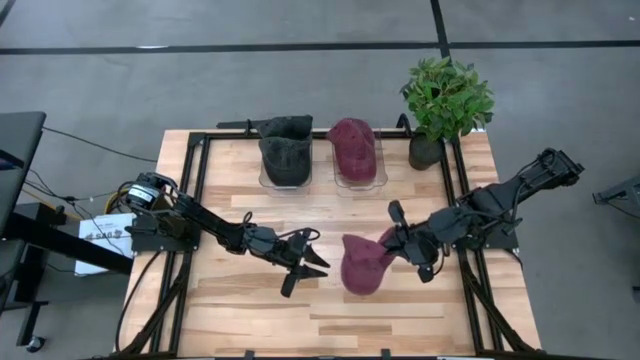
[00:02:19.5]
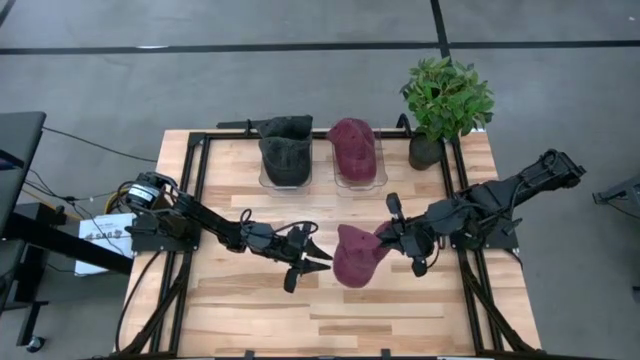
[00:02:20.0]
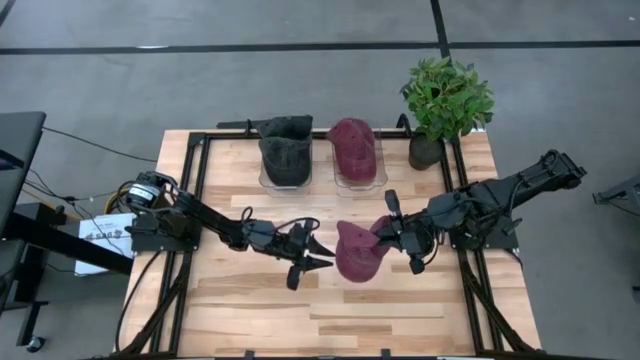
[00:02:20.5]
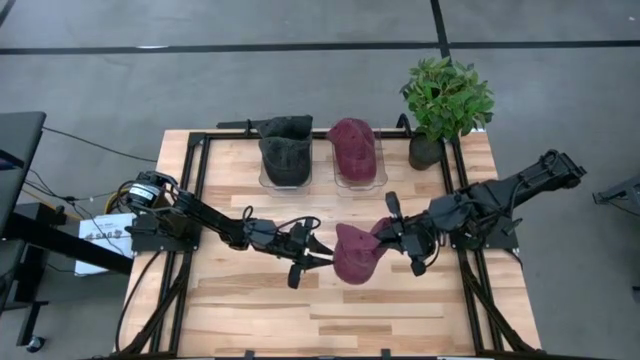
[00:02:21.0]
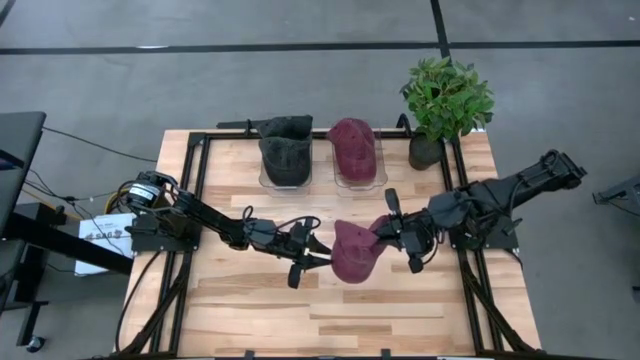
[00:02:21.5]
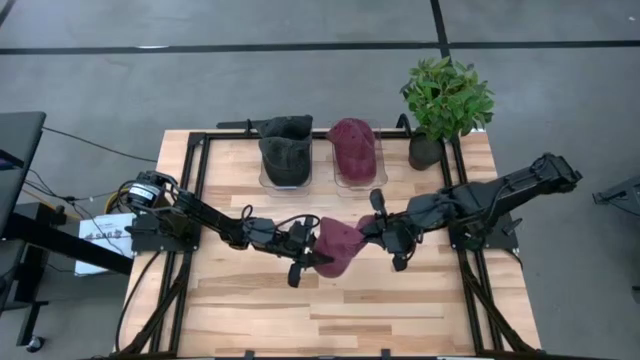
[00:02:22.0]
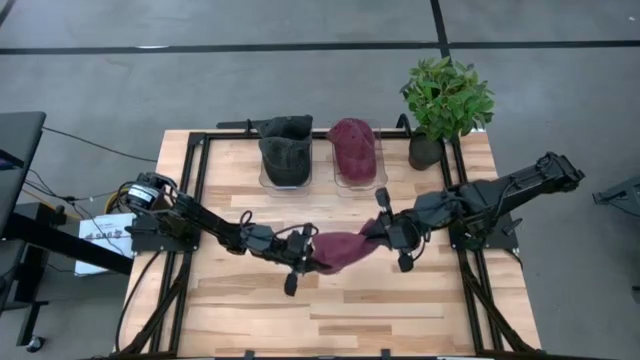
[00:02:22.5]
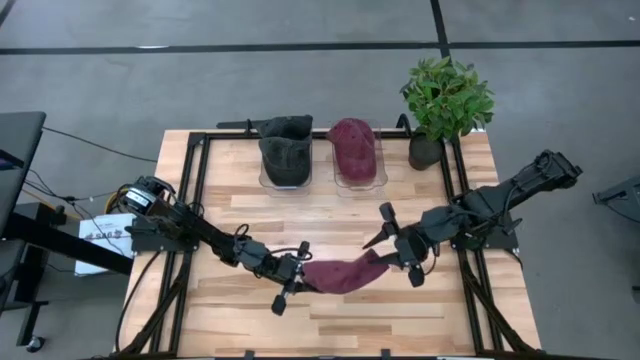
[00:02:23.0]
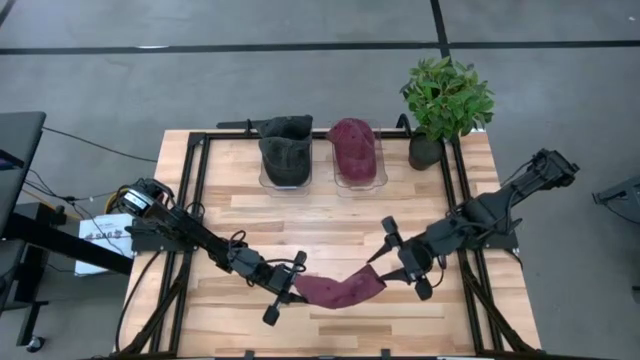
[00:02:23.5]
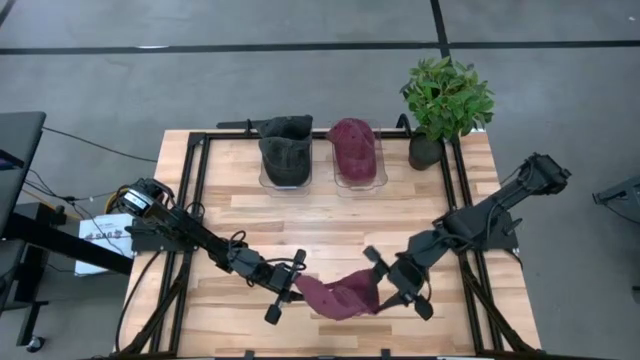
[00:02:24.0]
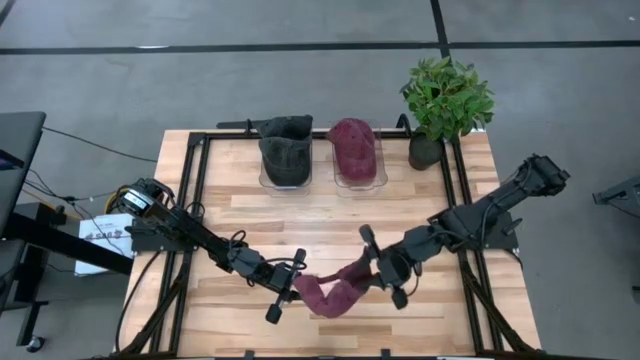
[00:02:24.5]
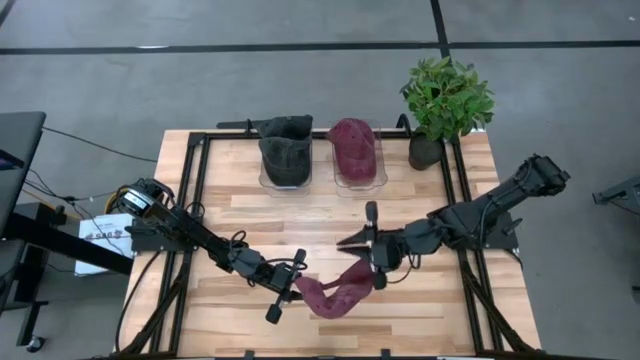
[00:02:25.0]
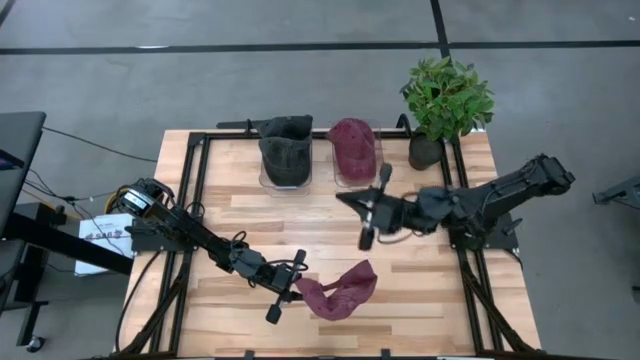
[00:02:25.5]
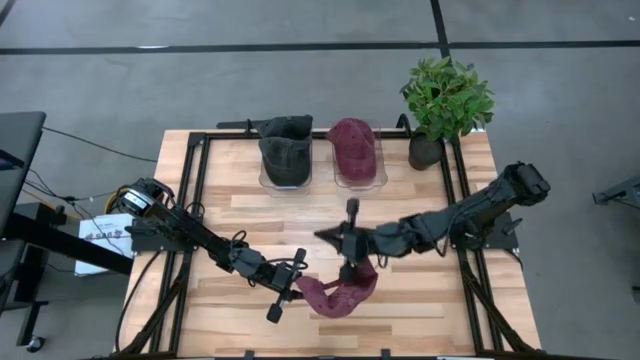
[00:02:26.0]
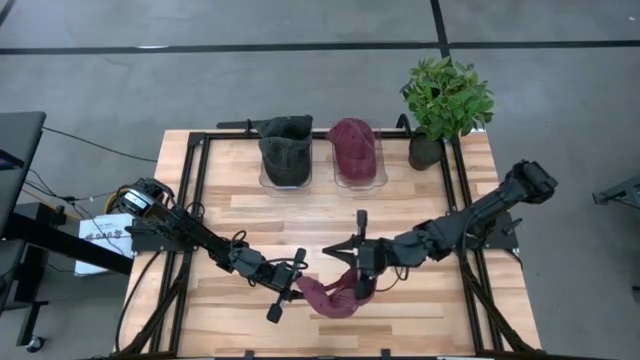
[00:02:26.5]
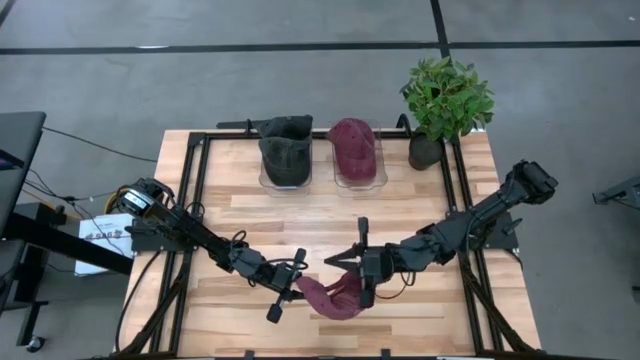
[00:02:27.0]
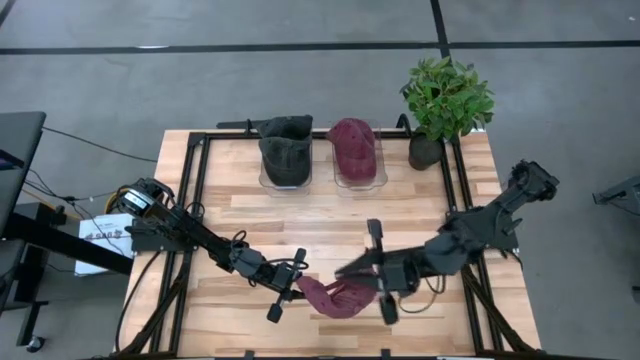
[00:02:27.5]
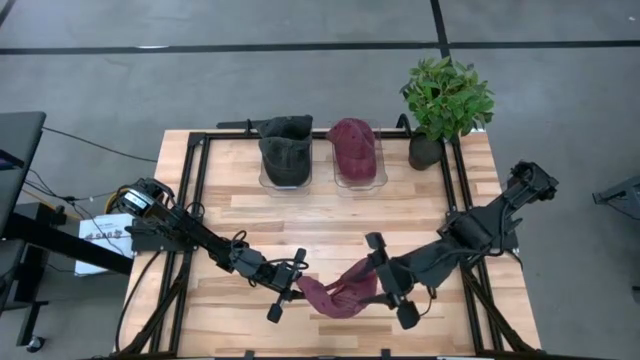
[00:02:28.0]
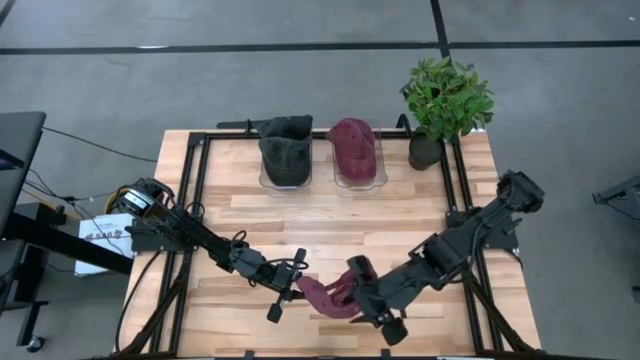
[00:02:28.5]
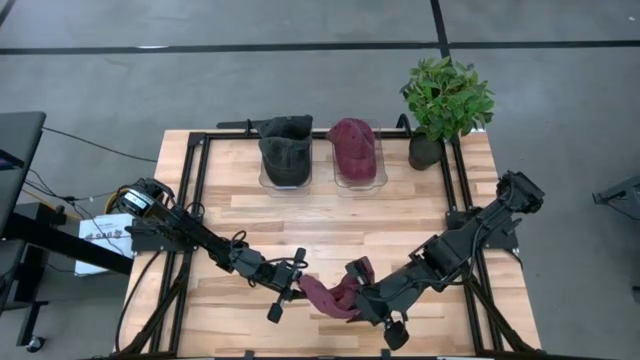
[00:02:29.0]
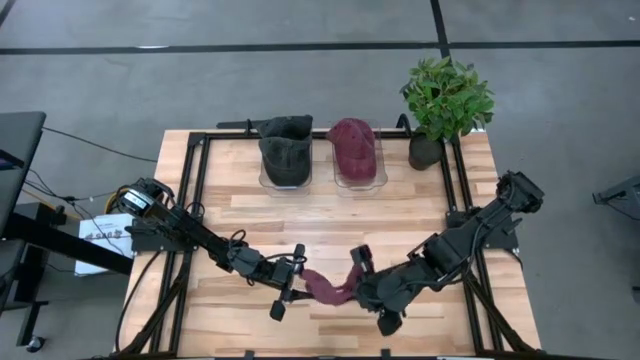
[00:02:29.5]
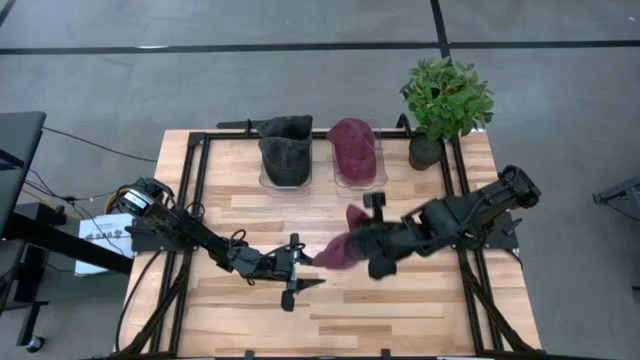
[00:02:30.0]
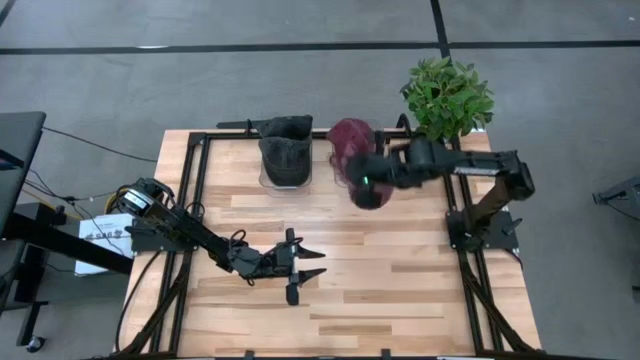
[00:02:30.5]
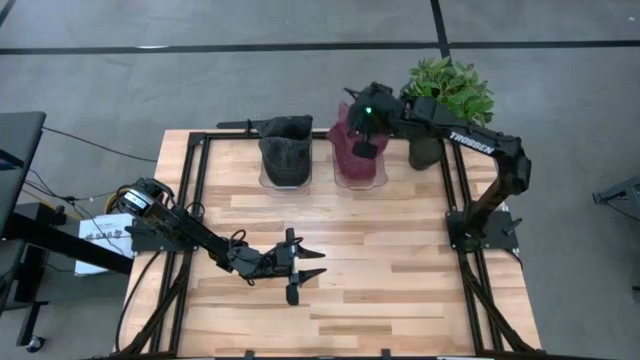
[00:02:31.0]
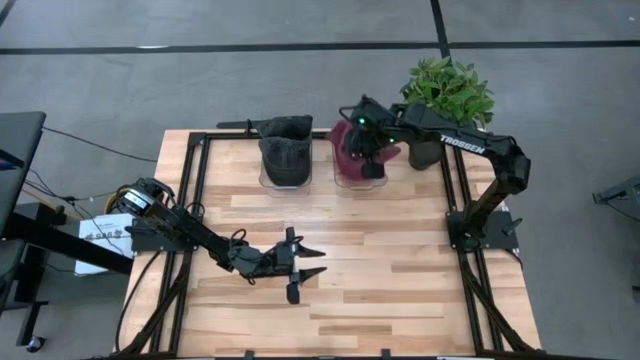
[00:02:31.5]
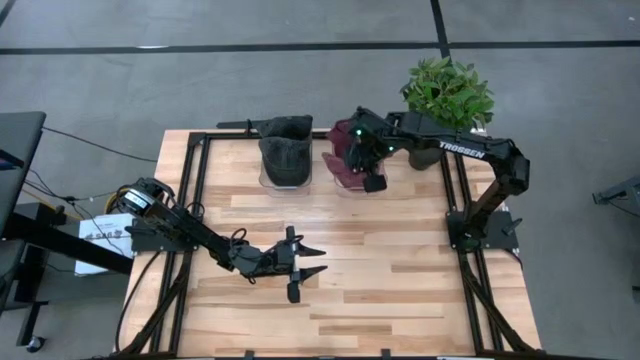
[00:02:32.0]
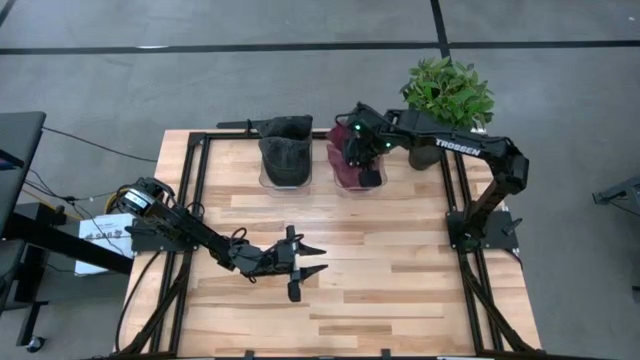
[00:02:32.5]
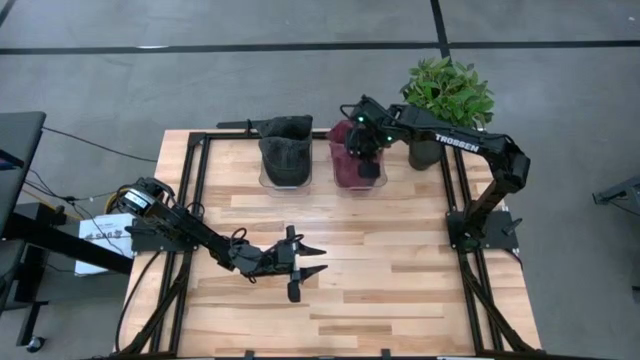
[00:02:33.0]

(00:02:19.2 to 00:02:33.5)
Task: Pick & Place hat
Put the red cap into the right transparent bin

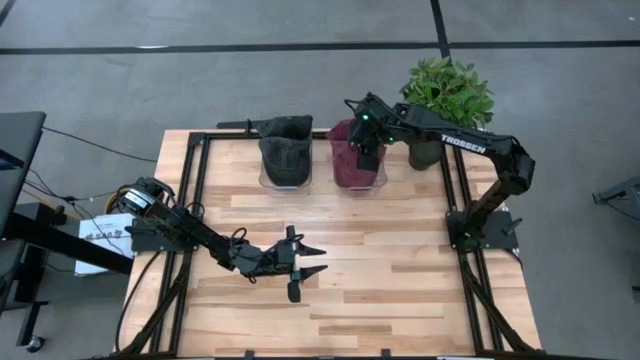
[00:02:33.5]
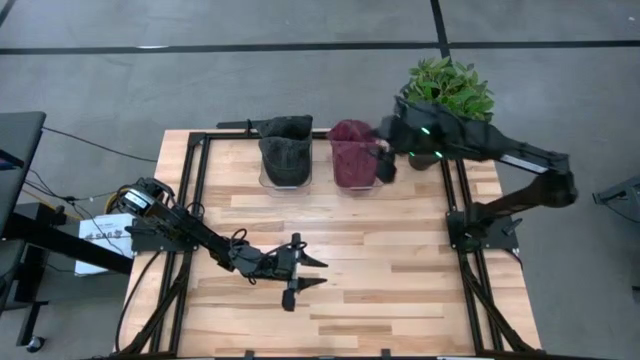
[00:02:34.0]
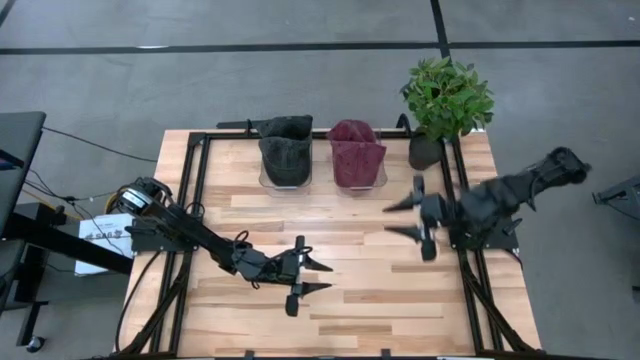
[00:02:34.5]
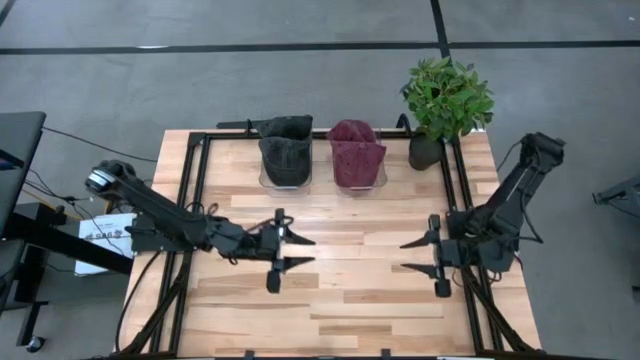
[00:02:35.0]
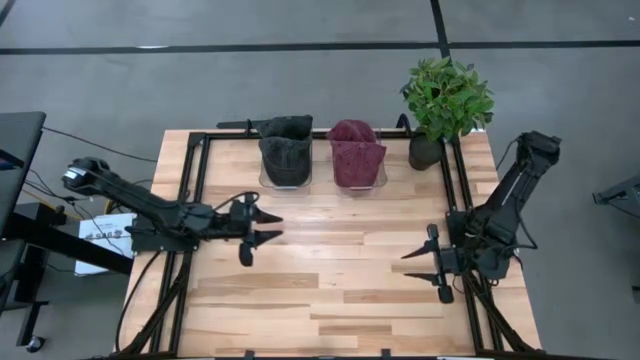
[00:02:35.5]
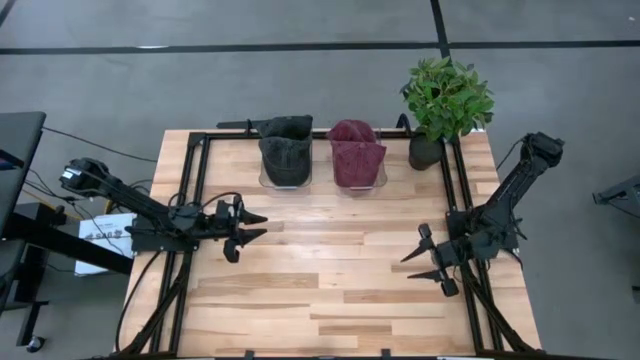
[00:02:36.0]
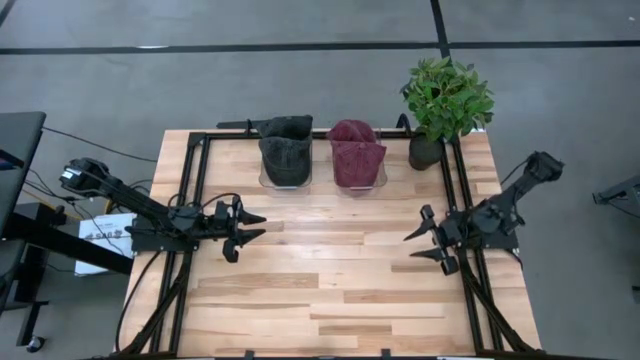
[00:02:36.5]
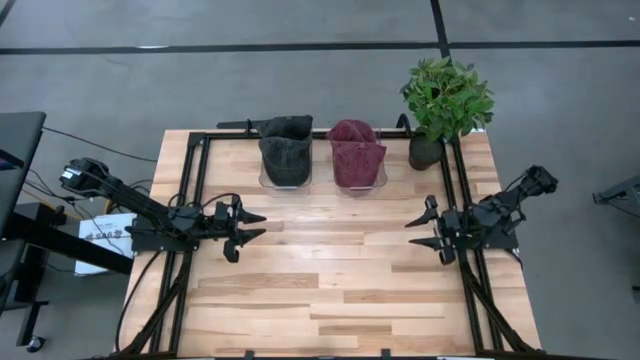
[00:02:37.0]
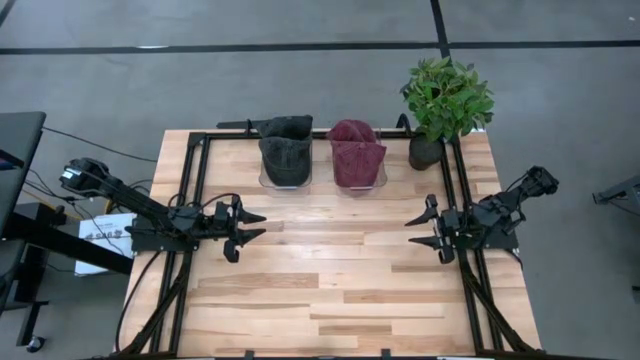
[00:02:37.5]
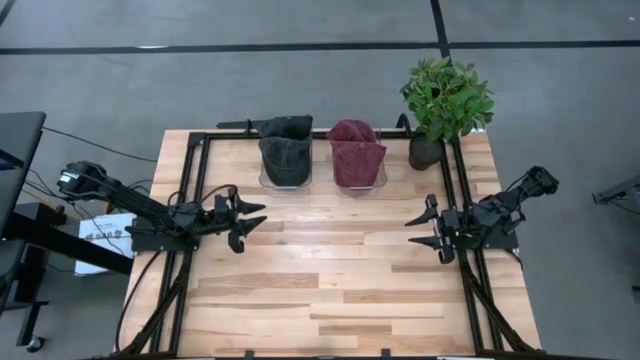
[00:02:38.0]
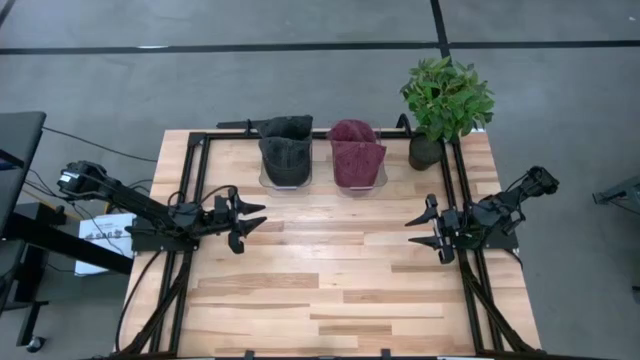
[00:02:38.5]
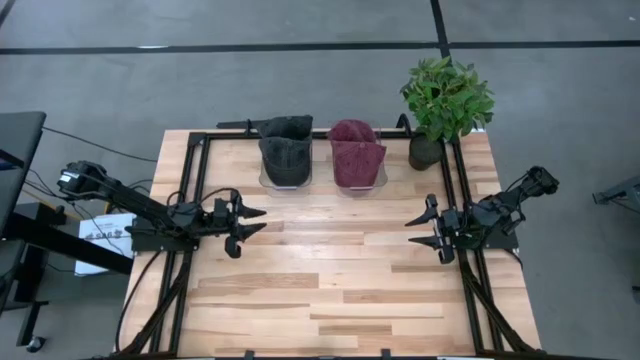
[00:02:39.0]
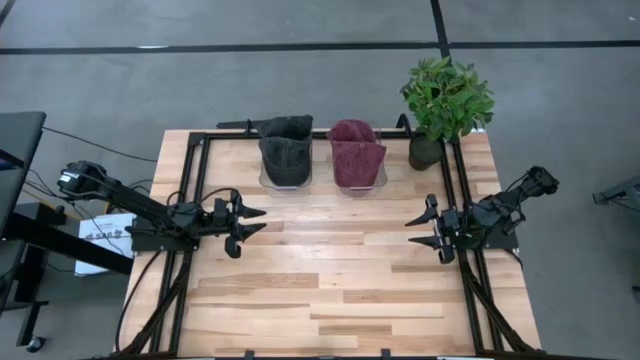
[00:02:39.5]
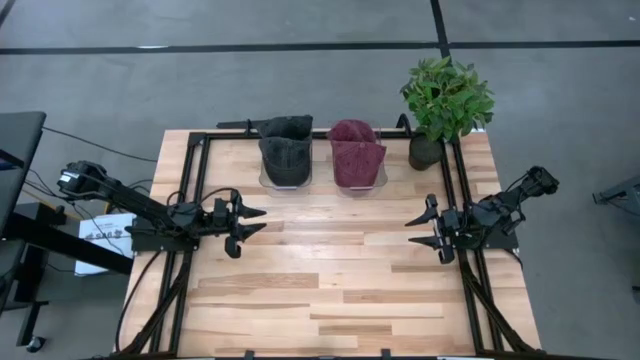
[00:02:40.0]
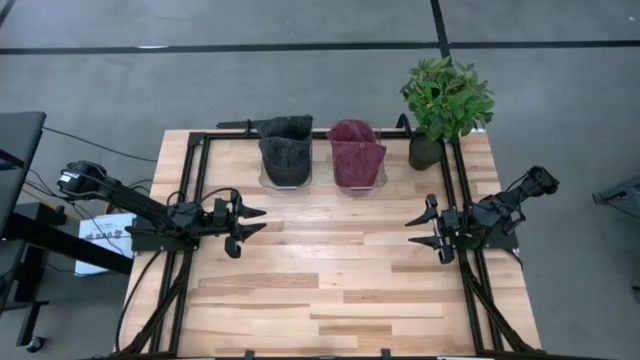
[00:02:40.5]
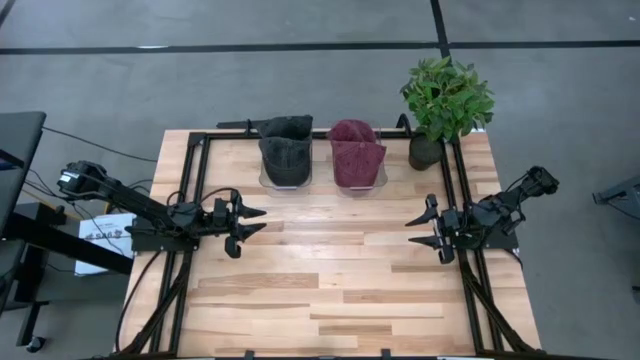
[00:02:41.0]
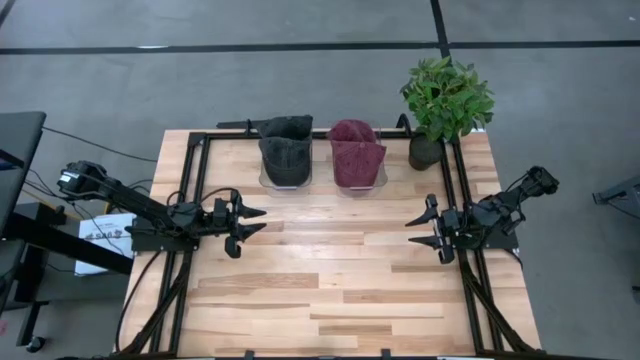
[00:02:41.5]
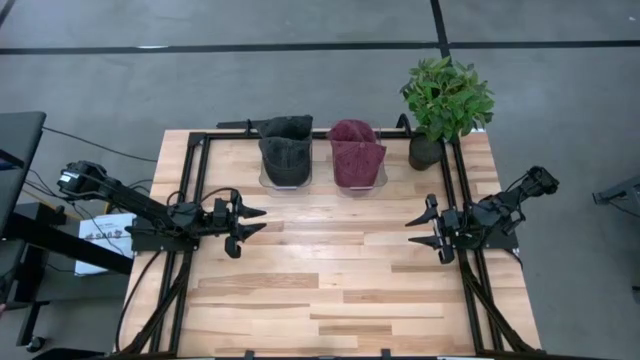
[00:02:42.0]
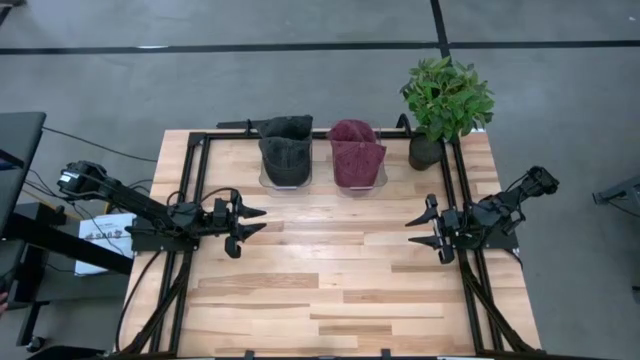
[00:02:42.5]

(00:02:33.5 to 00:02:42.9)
Return to Home Position
